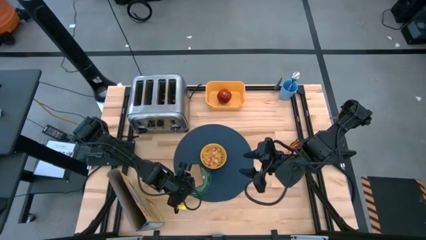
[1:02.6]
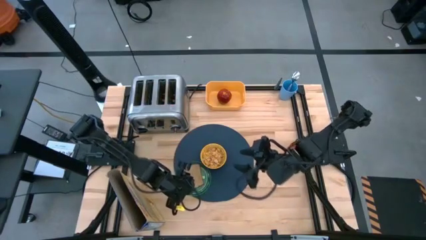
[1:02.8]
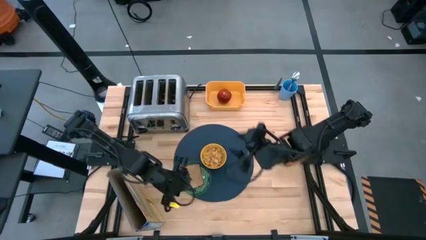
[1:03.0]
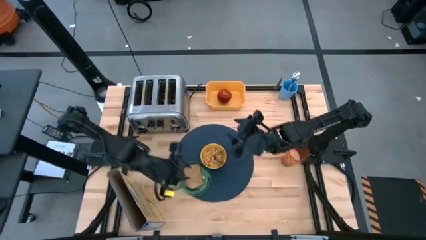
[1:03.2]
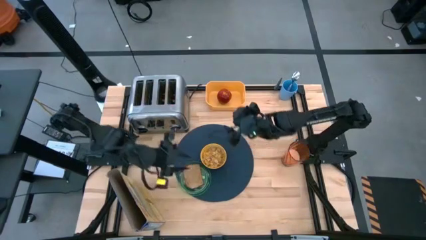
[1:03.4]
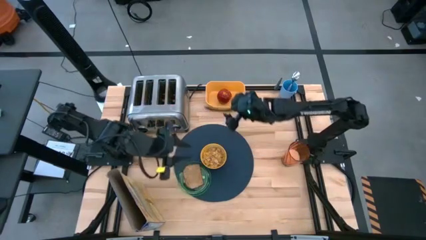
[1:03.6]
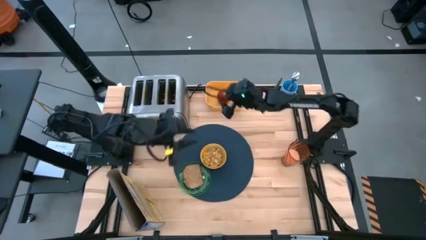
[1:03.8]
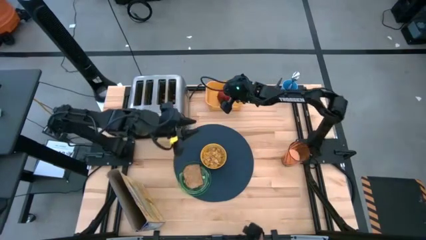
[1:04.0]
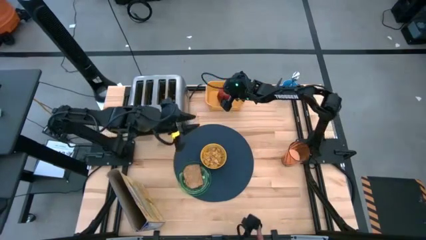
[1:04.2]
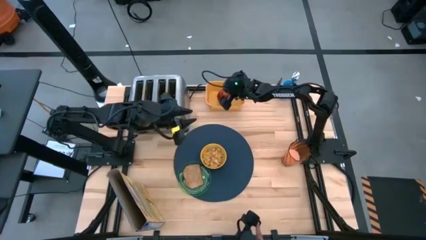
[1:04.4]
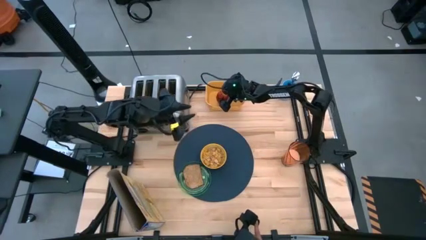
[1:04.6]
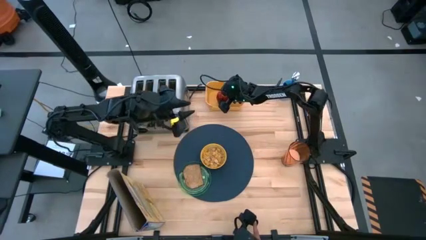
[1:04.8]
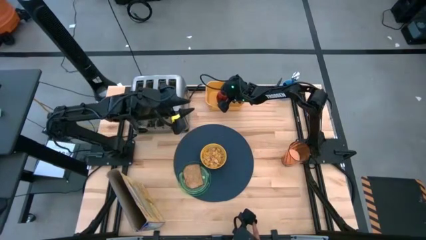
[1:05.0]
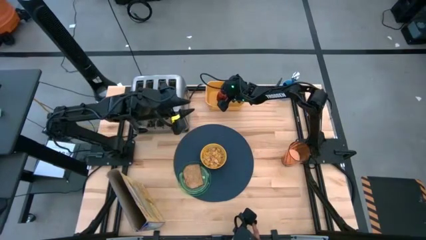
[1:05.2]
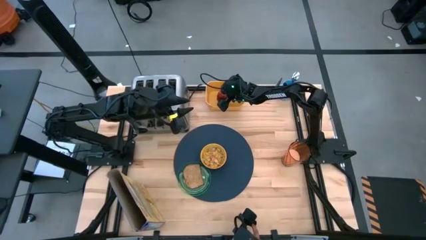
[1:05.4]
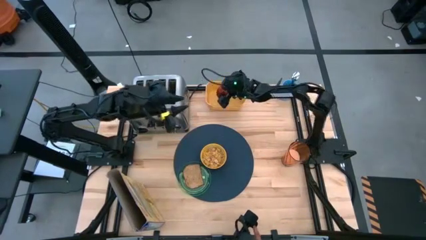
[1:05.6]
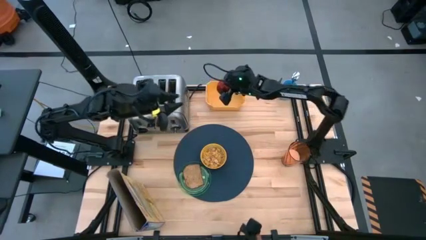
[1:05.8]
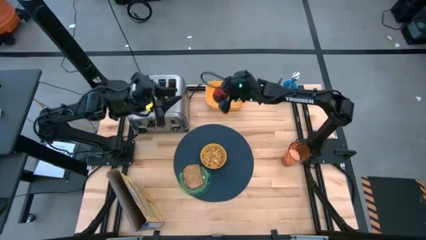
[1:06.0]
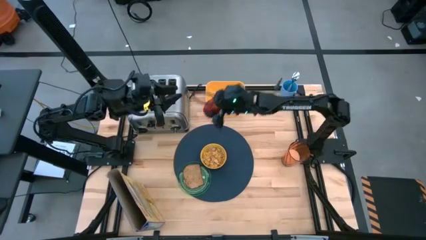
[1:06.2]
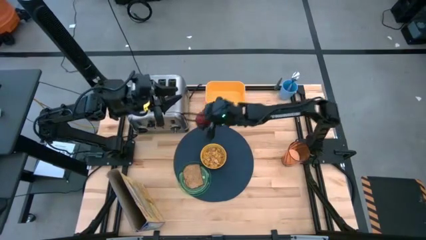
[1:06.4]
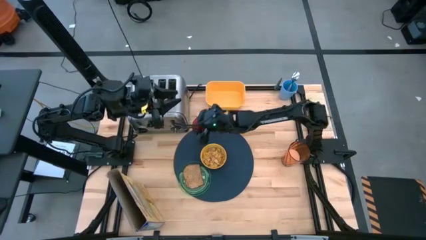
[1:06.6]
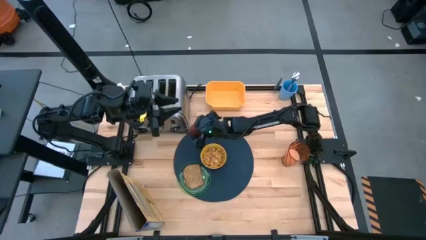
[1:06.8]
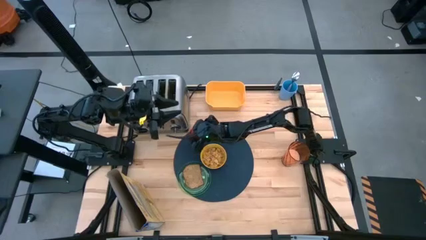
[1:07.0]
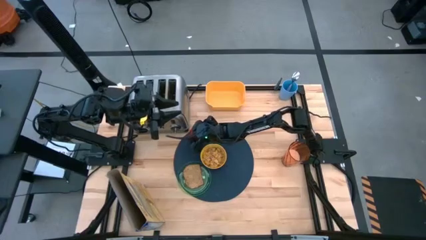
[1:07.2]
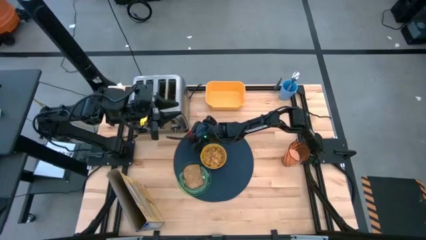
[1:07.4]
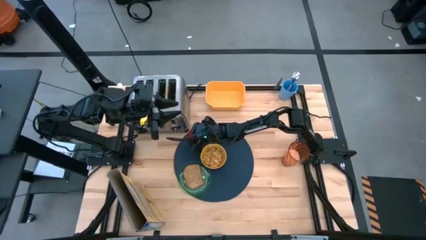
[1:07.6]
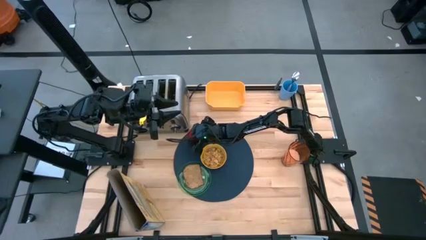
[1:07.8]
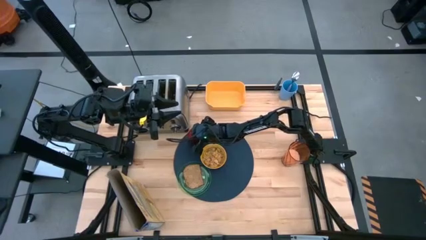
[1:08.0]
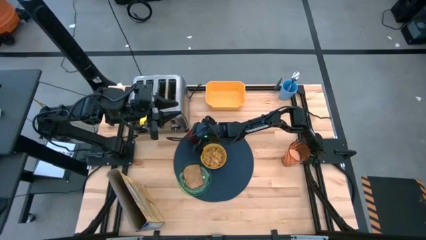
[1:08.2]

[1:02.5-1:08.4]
Task: Arrange a breakfast setting
Put the apple on the blue table mat

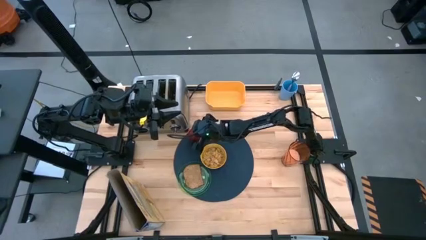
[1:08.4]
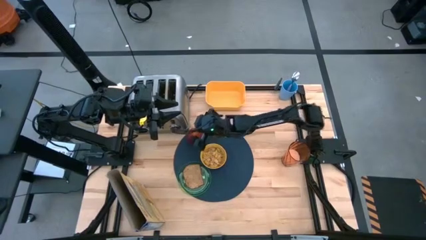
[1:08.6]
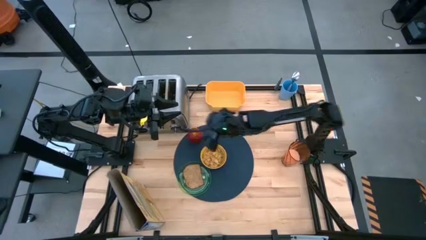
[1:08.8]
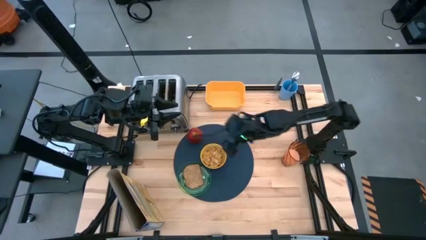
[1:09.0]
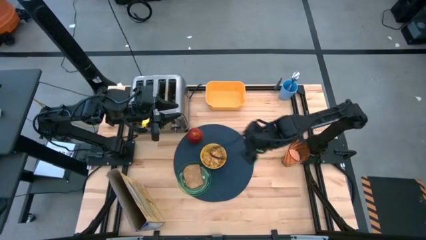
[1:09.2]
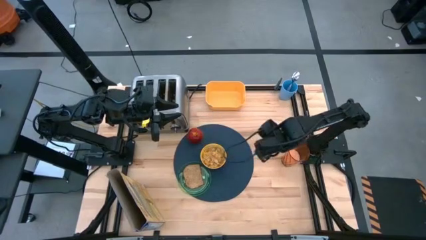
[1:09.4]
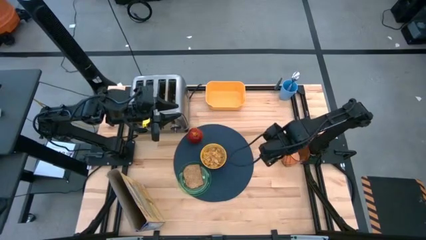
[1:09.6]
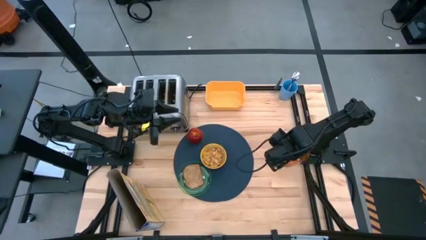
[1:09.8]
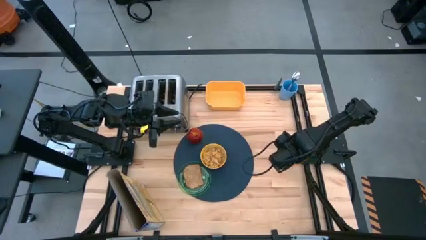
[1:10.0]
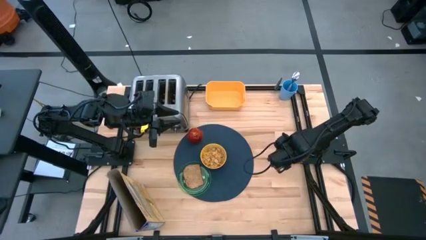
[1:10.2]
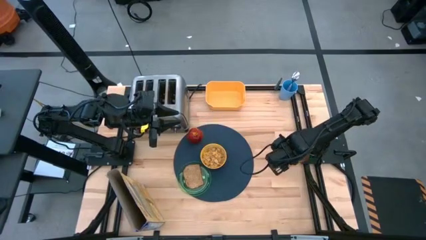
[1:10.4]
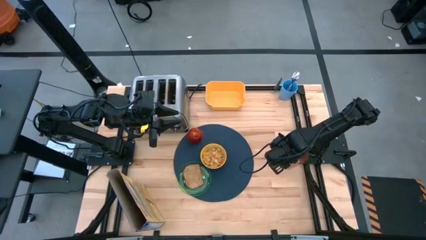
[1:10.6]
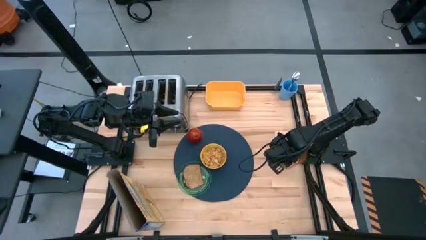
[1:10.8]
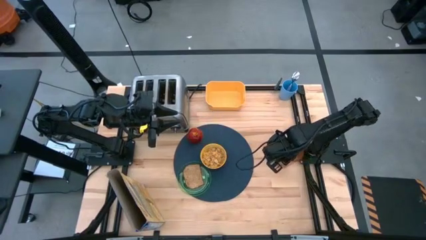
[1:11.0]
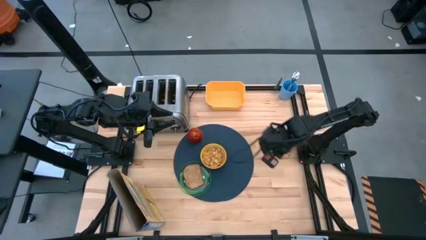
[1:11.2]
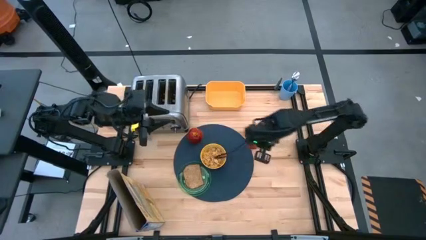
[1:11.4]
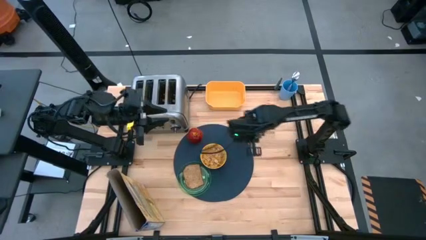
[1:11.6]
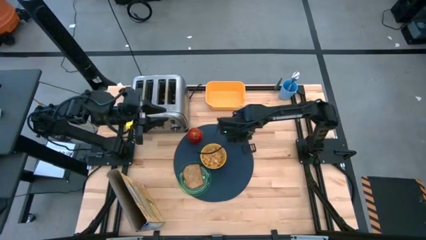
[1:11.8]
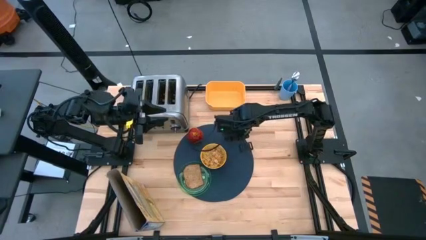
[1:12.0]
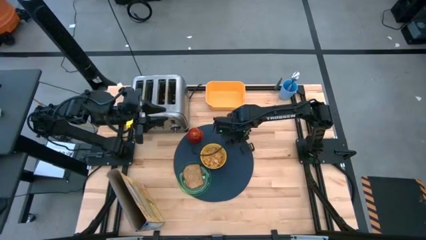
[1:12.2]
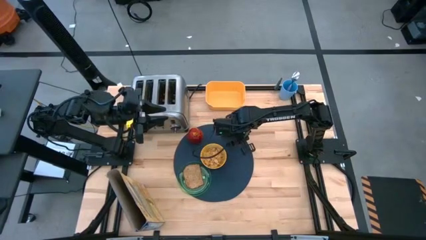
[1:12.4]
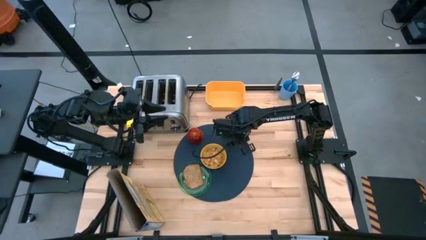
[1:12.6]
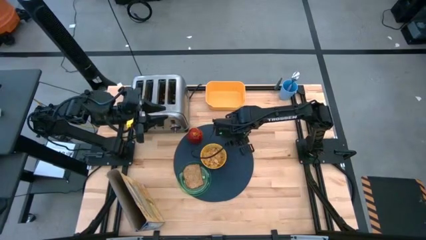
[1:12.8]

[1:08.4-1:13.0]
Put the orange glass of milk on the blue table mat
